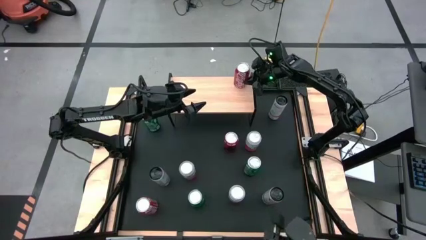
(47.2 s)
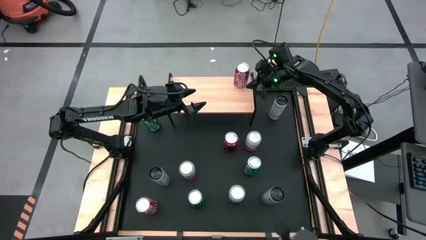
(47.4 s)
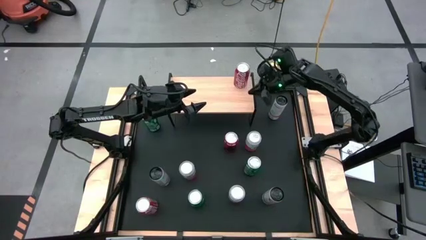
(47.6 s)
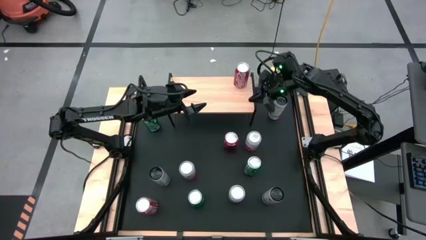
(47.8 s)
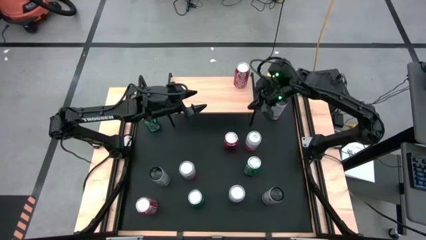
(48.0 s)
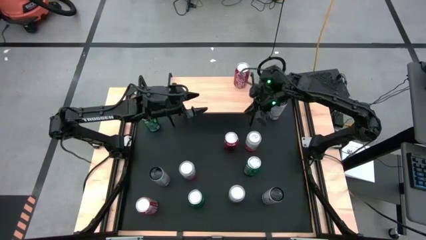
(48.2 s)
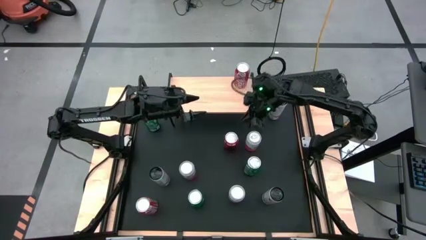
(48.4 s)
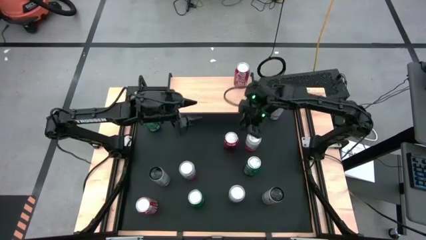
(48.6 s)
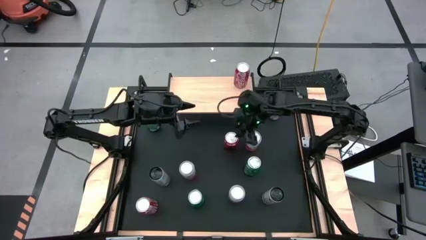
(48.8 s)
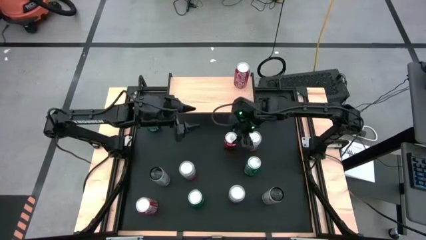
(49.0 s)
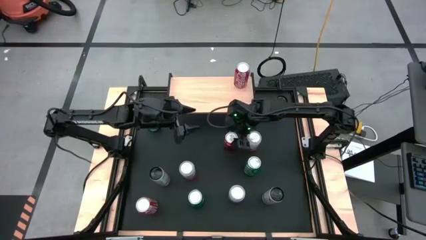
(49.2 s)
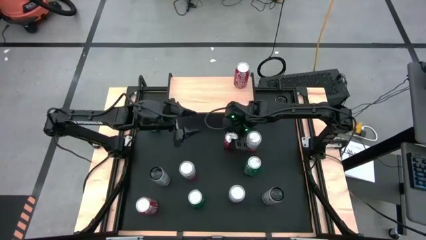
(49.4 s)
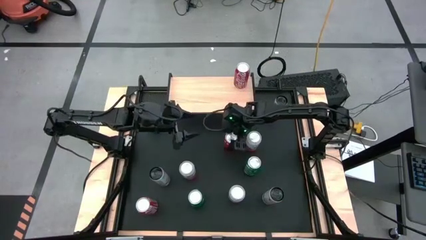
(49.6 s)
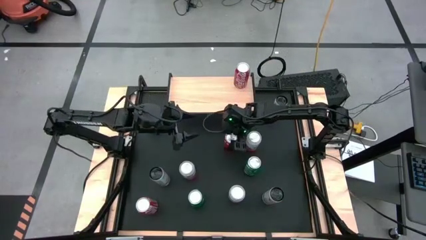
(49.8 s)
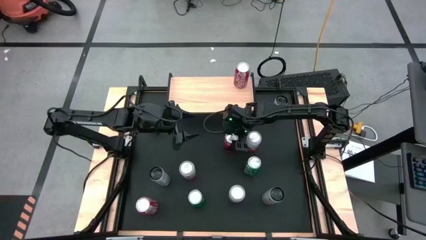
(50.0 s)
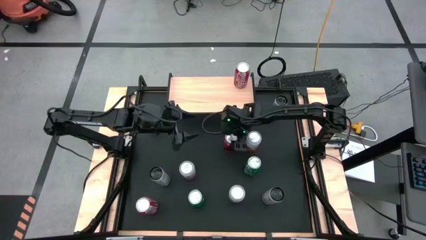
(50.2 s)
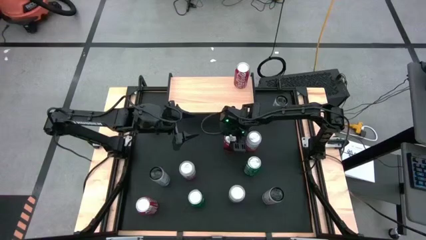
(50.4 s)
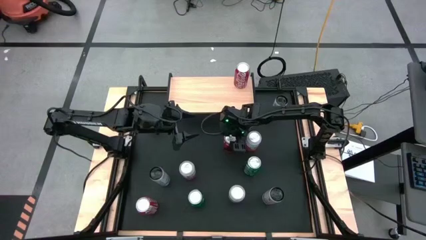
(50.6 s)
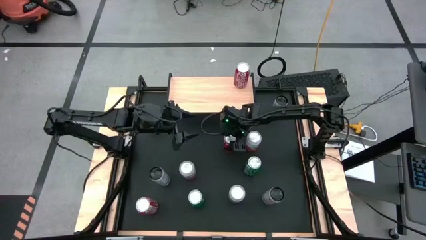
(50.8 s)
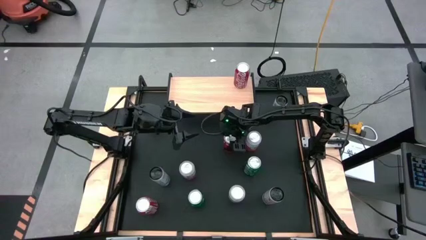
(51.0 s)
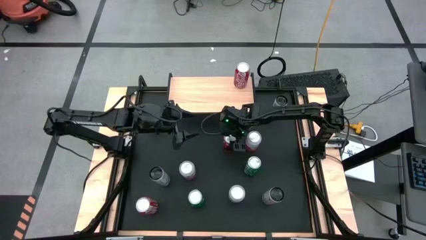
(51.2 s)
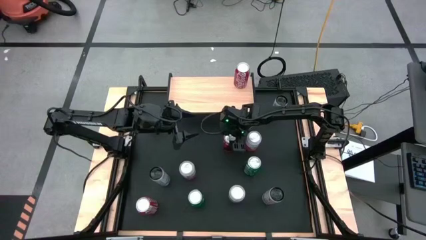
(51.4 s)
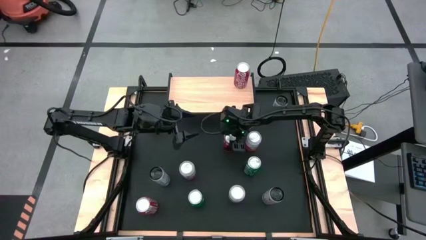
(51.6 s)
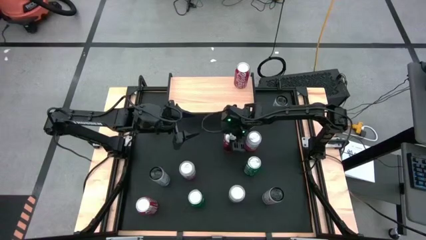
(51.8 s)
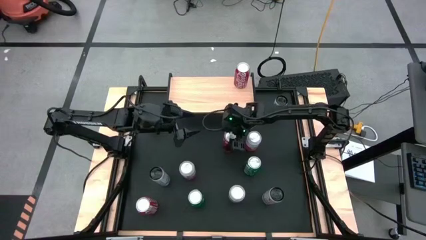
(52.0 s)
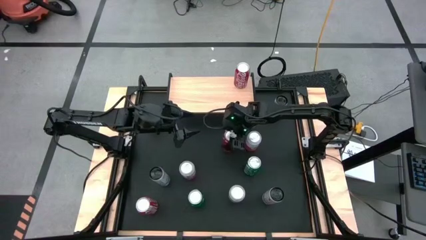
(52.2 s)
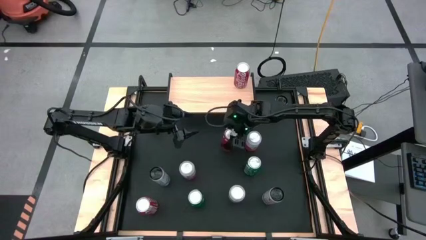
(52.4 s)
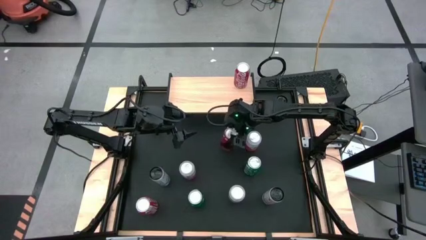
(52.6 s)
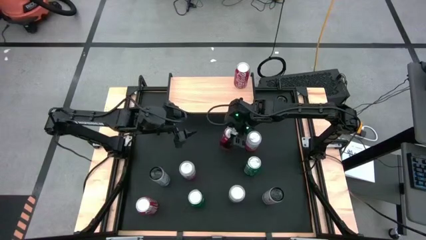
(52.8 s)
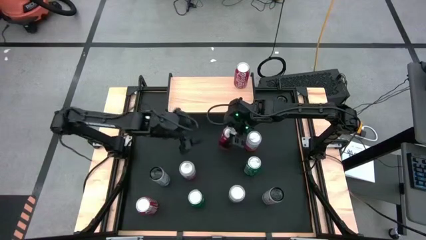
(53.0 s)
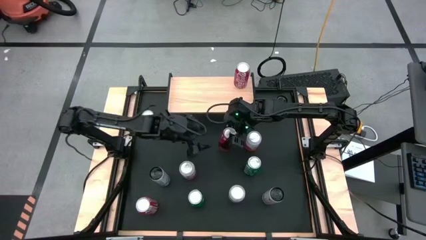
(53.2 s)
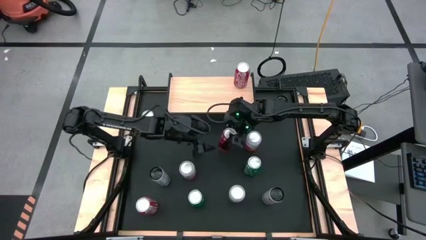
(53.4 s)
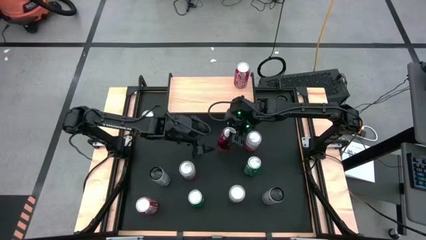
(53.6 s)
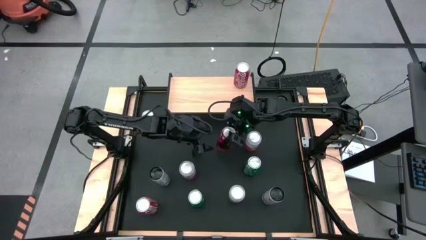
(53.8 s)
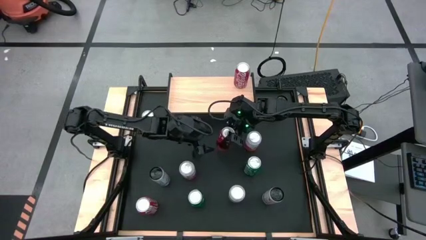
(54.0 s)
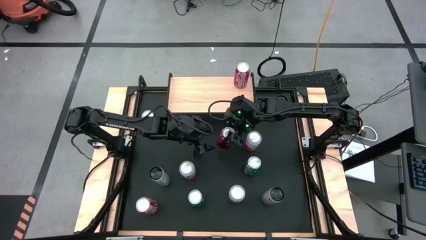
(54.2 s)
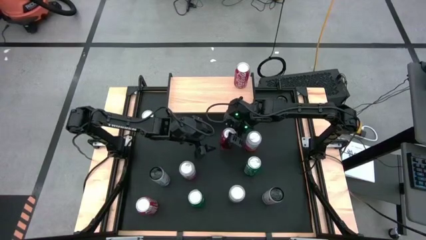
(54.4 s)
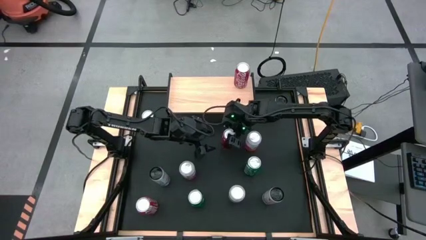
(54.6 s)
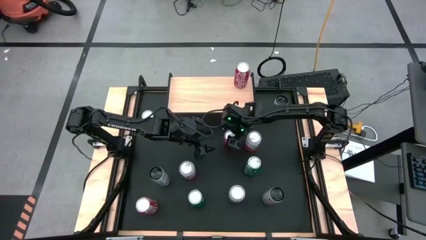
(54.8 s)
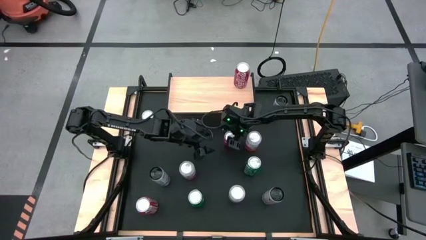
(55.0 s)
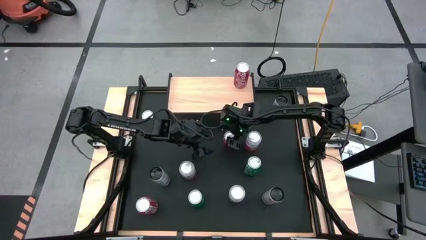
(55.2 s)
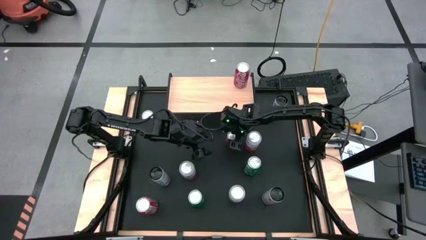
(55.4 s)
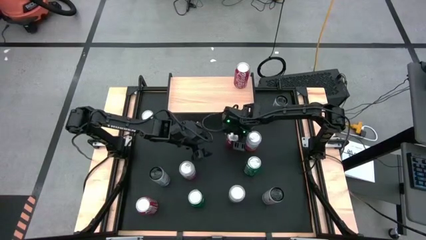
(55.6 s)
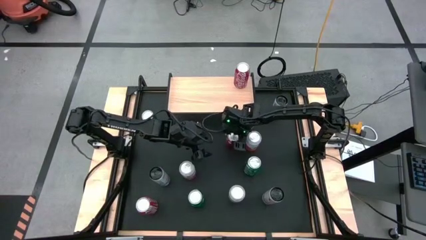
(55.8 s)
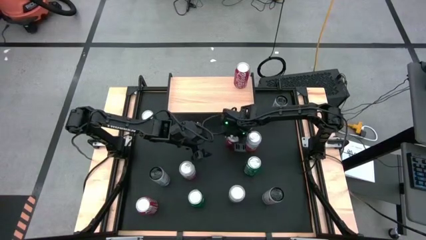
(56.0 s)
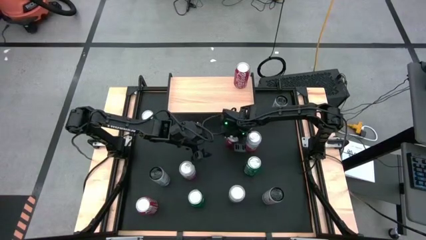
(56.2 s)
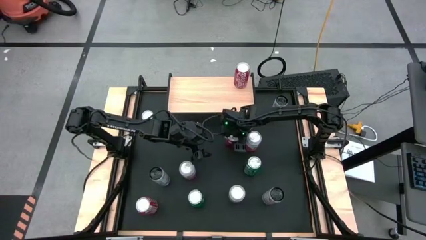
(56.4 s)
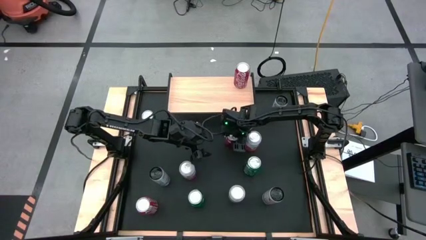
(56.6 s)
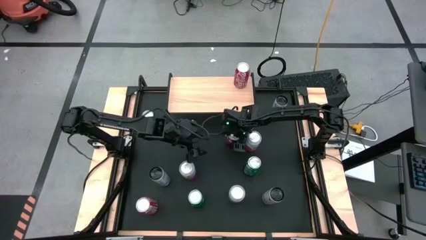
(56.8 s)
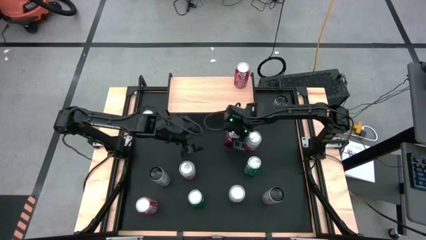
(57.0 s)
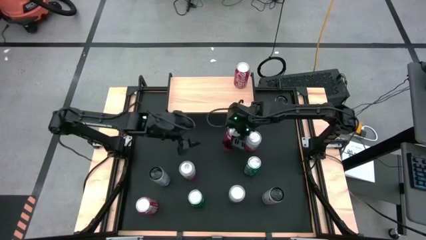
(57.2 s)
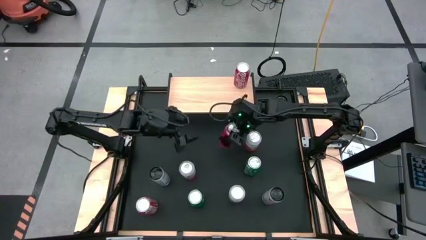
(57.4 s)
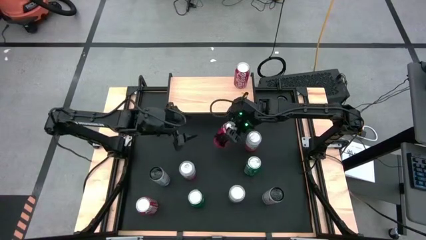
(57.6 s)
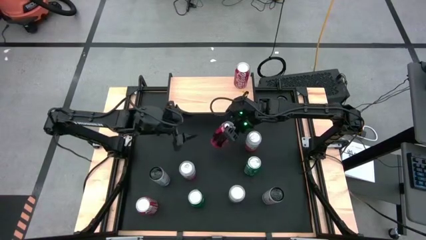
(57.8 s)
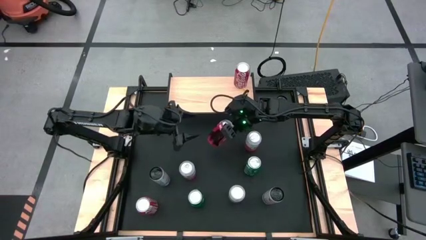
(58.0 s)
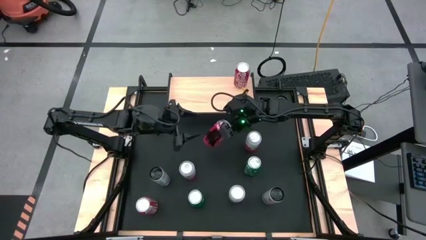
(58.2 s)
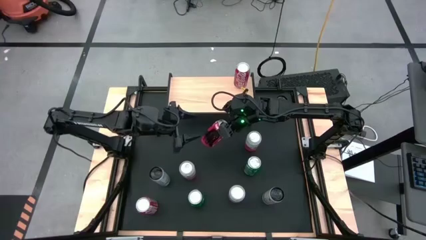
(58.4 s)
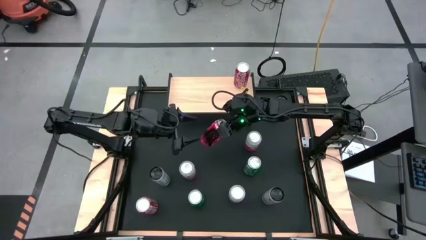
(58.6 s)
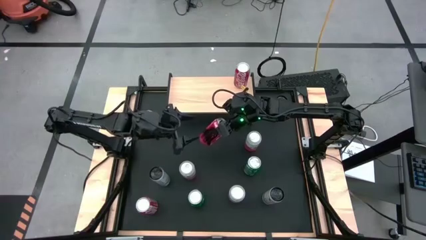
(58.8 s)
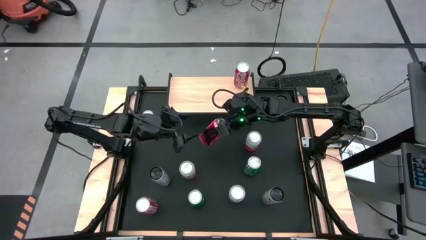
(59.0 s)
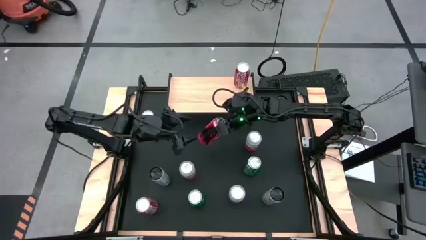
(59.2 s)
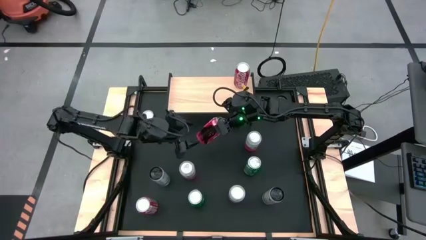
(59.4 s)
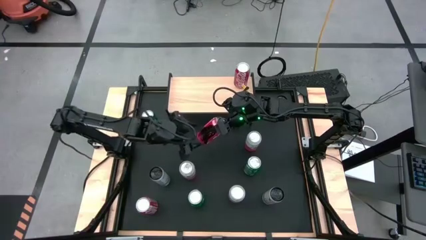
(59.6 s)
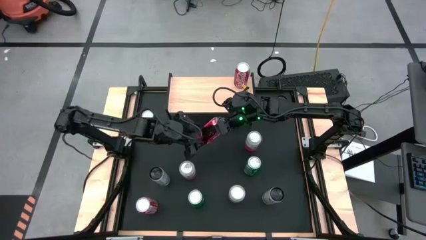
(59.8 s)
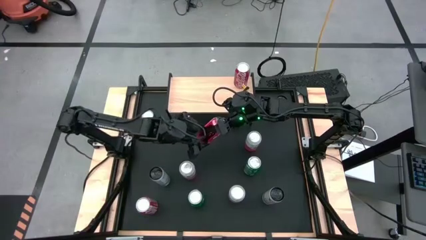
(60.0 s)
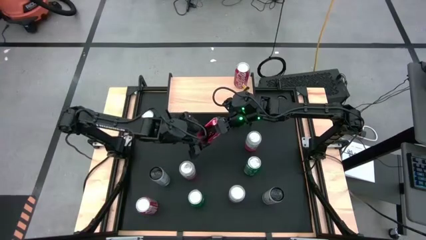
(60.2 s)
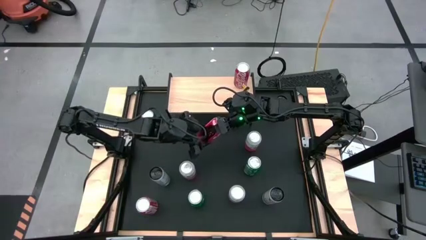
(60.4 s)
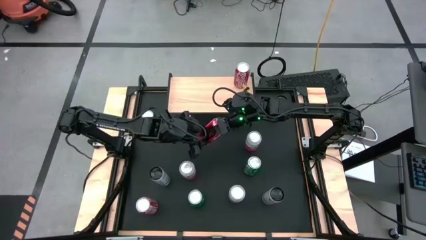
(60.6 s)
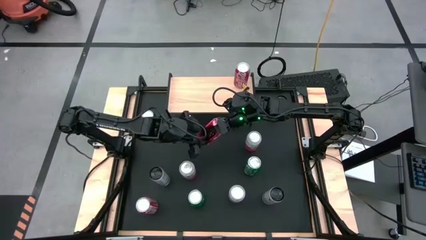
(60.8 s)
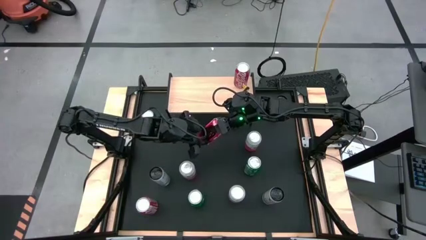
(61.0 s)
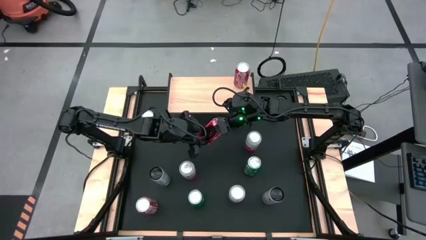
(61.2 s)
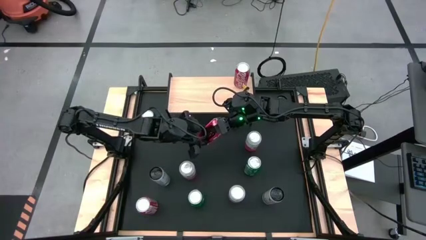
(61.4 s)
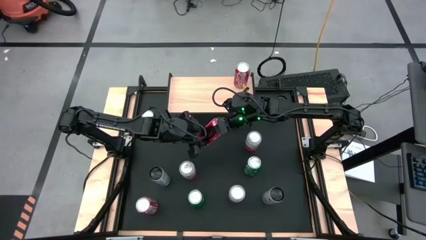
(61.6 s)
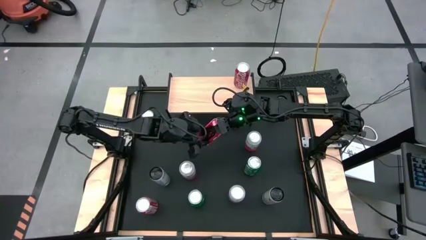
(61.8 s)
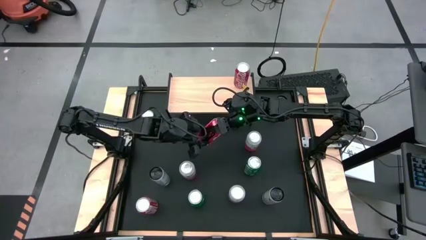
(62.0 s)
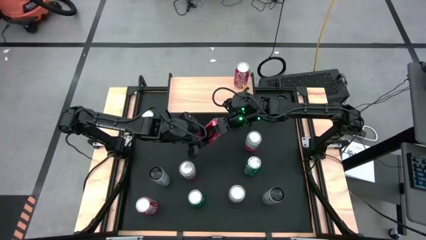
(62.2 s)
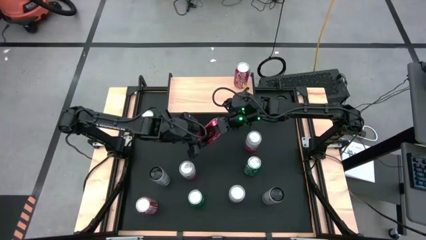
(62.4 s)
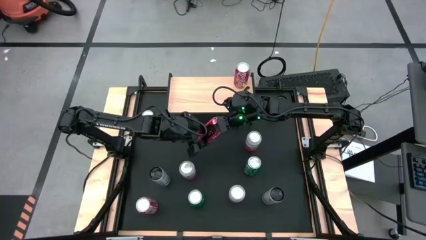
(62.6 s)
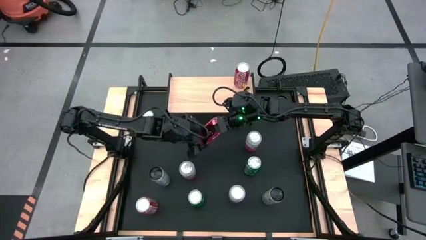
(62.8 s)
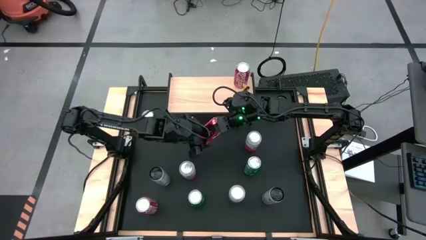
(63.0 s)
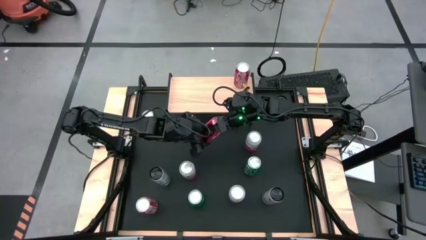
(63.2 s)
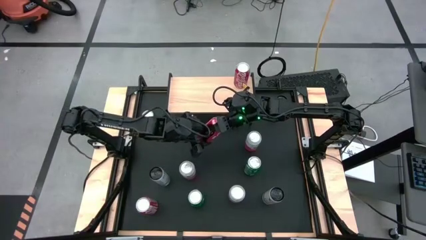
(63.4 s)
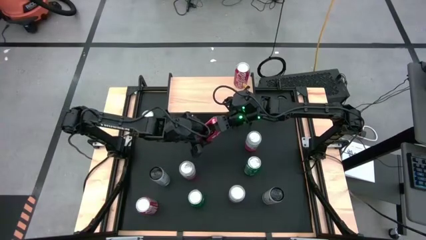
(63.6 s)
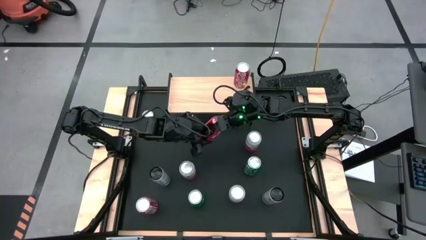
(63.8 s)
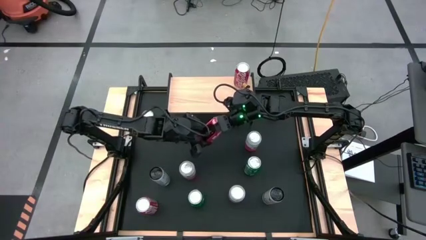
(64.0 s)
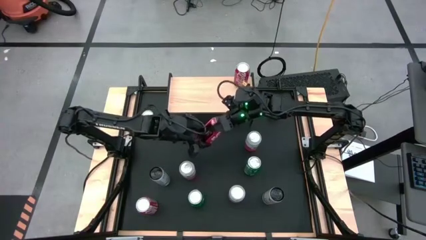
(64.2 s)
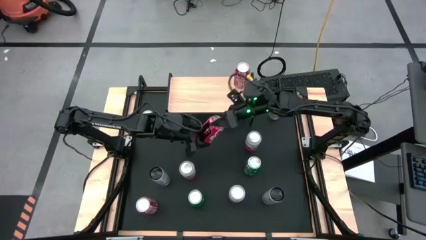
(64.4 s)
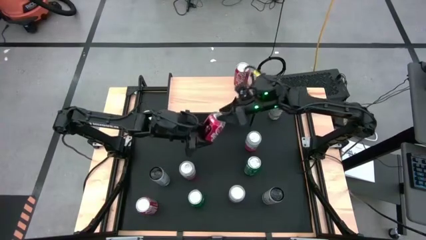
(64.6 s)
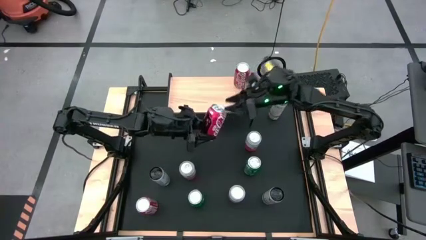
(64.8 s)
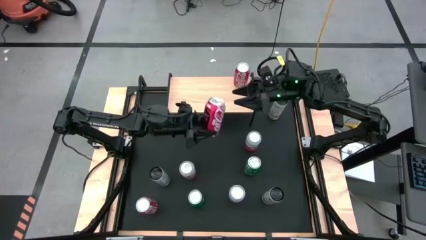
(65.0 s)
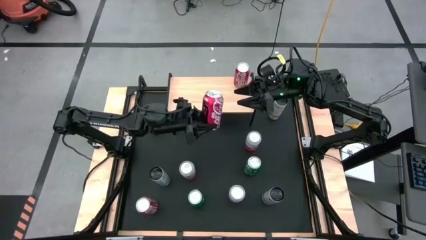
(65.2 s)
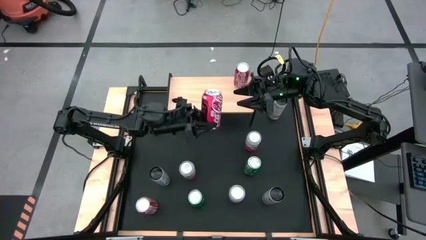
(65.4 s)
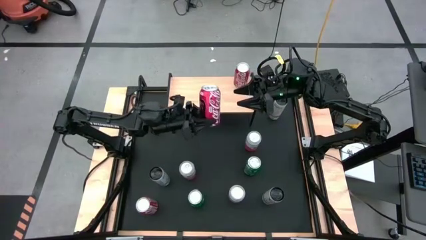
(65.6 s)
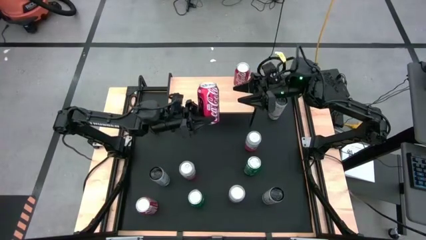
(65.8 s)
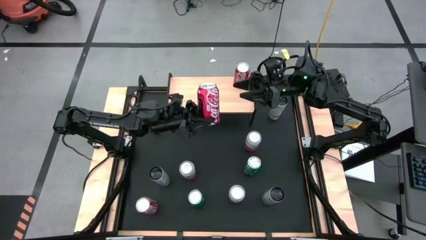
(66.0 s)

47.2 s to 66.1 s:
Task: Place canned beverage on shelf
Put the top red soda can aligned with the other red soda can on the shelf
